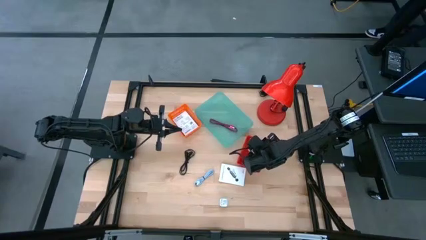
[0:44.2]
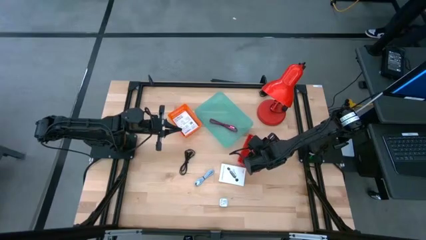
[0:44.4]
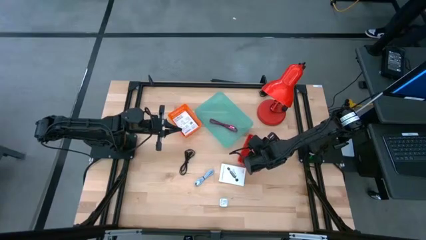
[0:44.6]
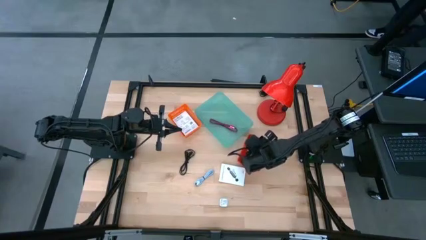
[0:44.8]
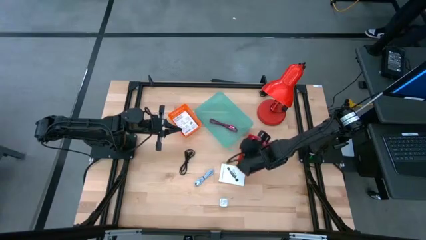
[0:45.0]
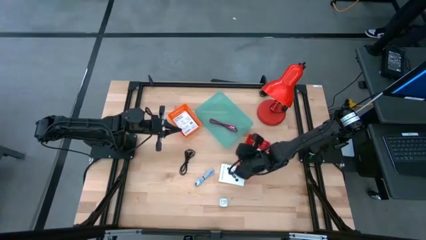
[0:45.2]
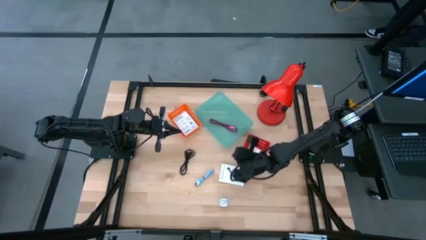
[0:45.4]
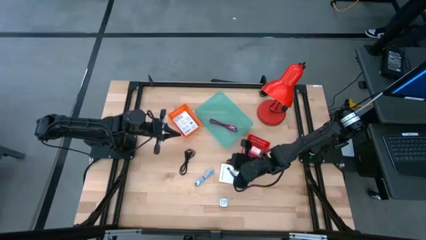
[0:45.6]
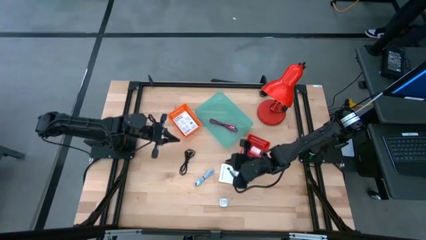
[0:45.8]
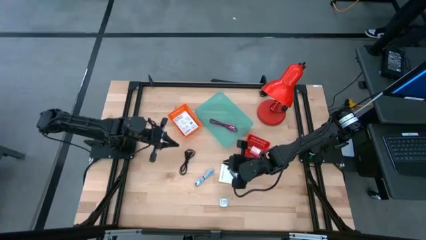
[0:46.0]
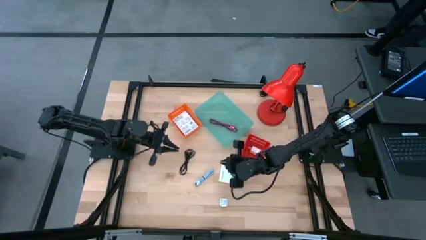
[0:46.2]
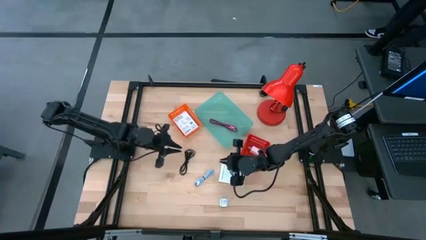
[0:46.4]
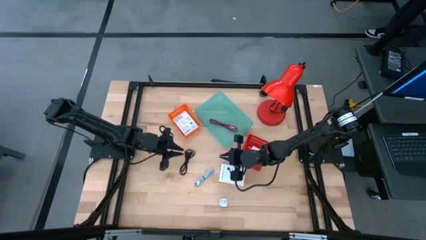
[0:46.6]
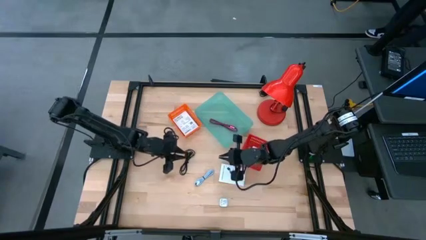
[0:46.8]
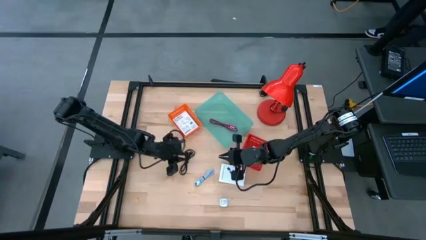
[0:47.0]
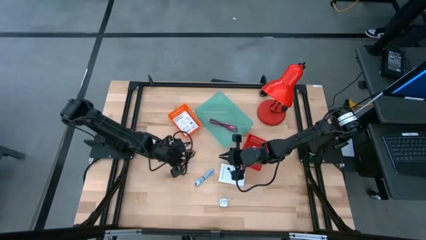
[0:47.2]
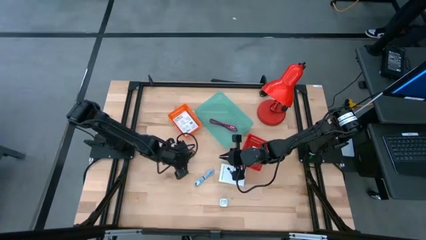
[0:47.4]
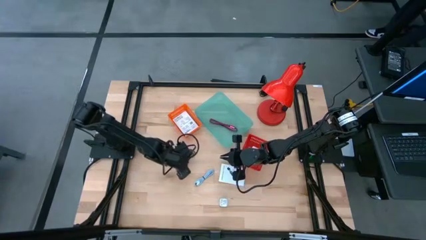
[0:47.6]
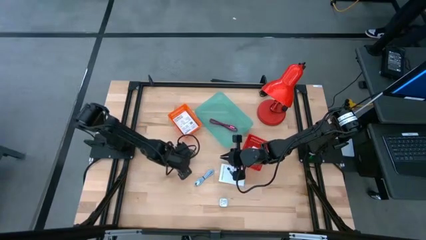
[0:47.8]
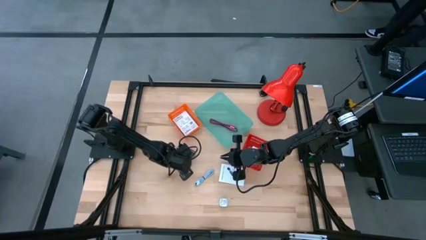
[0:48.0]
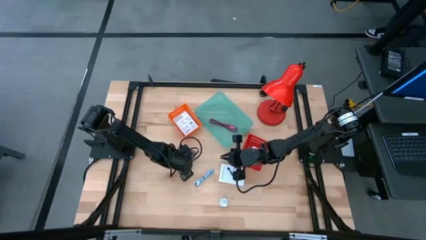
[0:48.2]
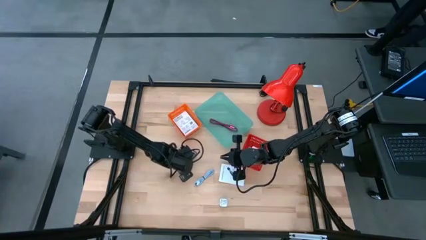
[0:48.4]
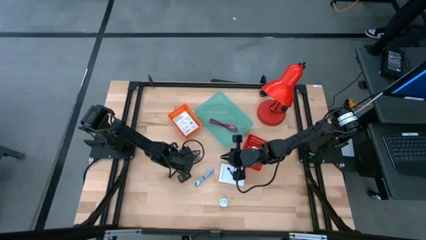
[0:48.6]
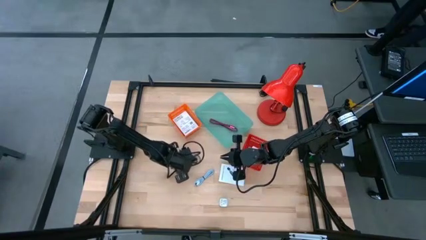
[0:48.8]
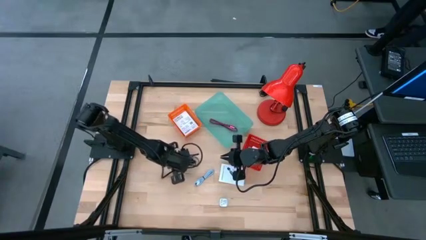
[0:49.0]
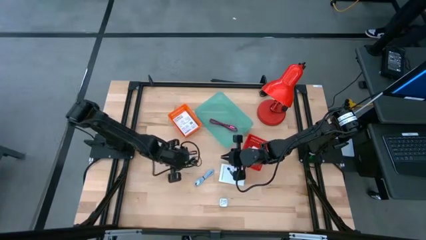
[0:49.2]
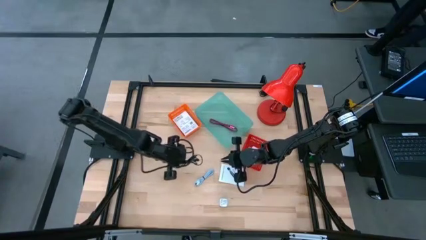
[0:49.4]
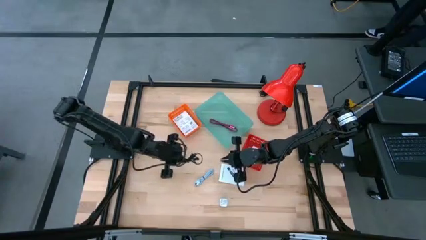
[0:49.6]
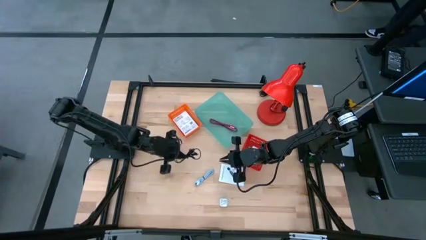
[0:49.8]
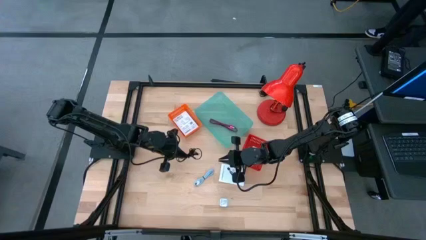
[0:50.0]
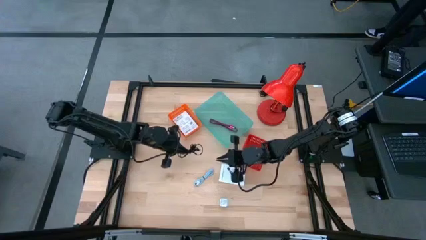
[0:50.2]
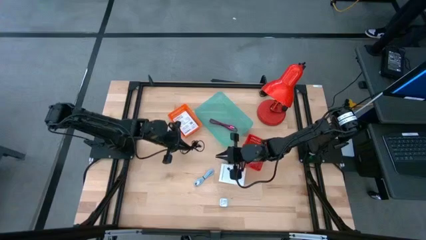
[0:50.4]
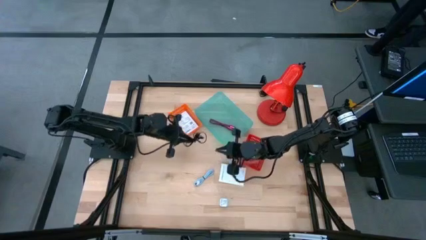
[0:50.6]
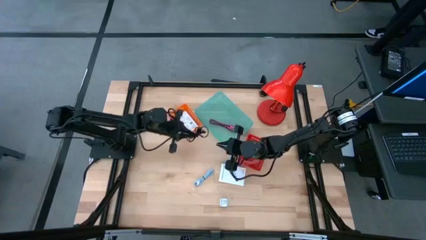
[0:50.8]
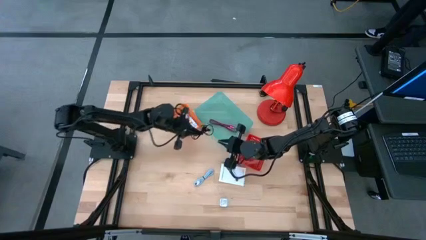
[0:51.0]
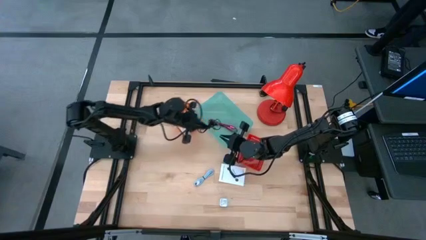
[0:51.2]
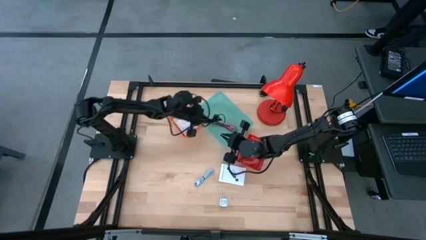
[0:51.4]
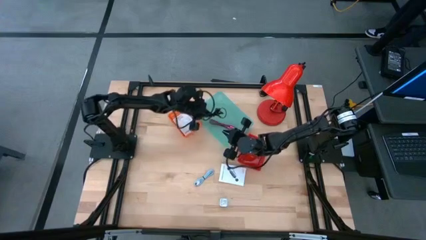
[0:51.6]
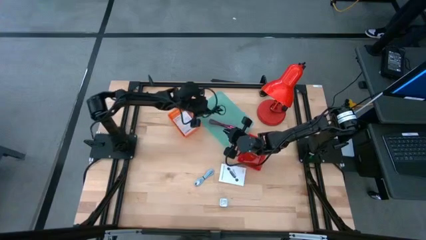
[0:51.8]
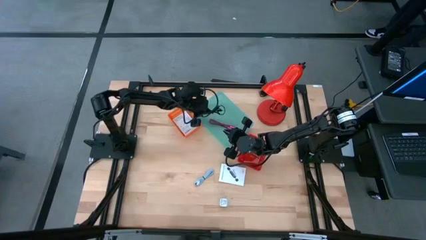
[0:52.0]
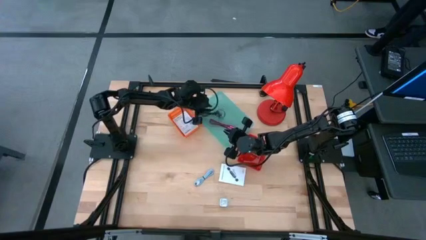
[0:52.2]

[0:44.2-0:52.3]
Task: Pick and place items into bin
Put the black charger cable into the blue bin

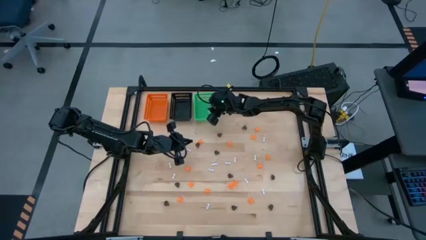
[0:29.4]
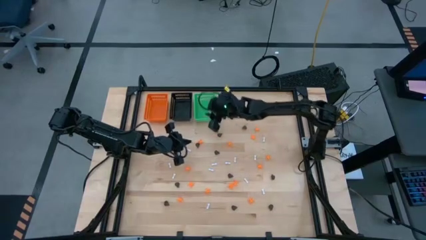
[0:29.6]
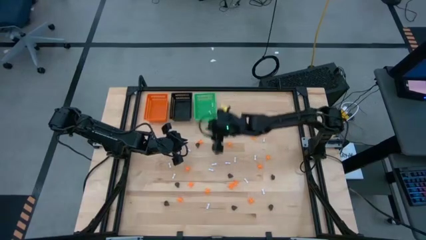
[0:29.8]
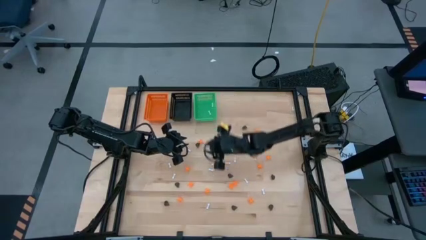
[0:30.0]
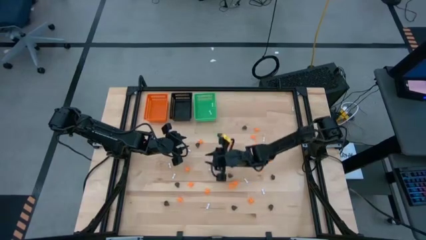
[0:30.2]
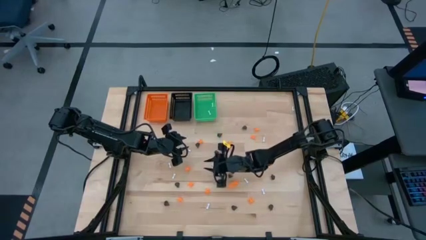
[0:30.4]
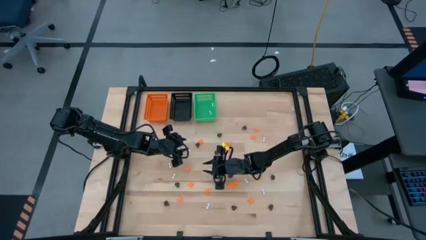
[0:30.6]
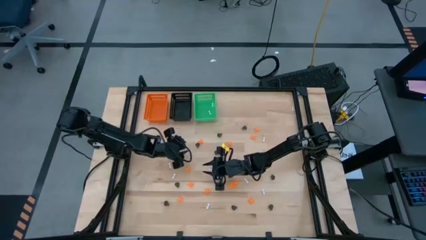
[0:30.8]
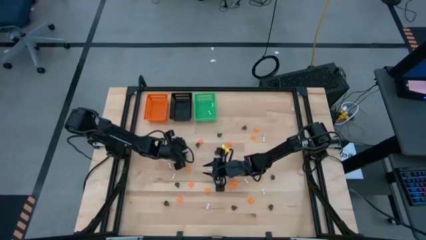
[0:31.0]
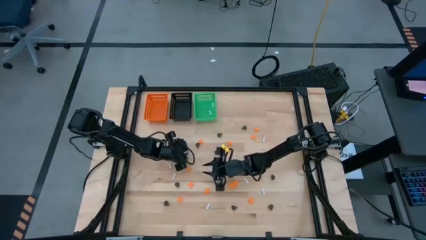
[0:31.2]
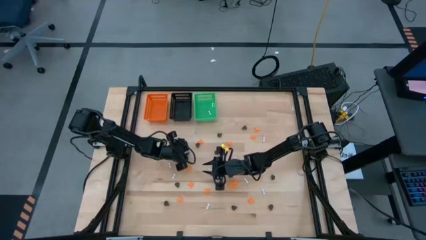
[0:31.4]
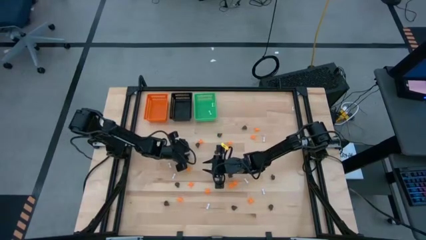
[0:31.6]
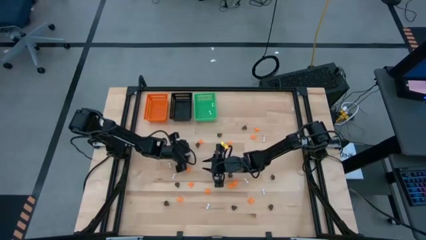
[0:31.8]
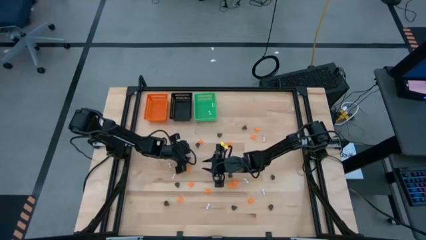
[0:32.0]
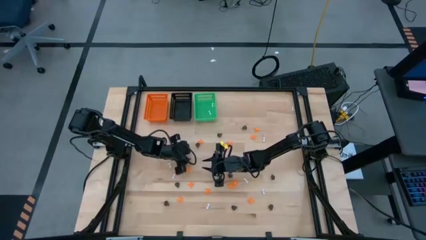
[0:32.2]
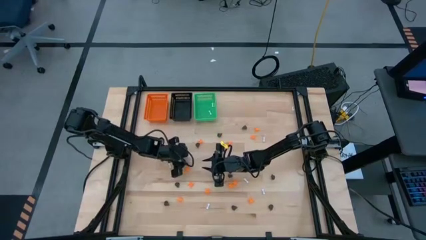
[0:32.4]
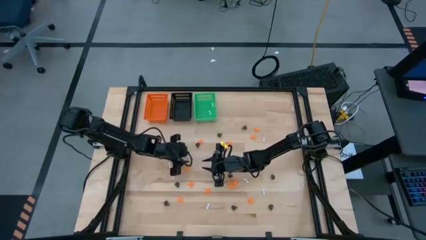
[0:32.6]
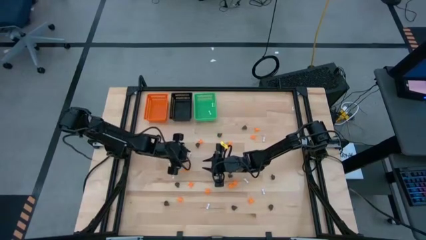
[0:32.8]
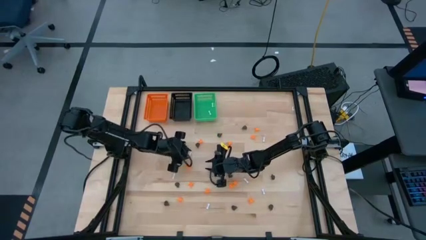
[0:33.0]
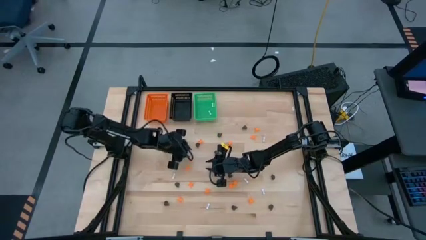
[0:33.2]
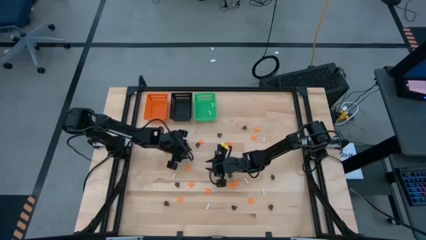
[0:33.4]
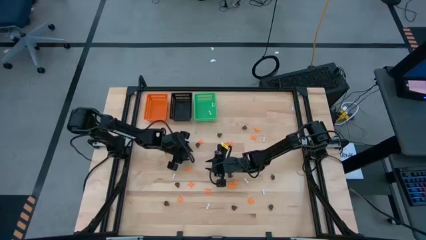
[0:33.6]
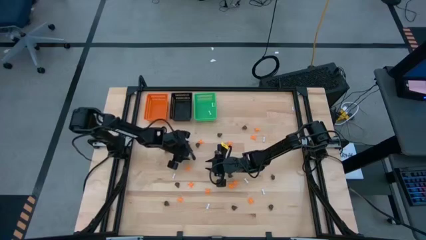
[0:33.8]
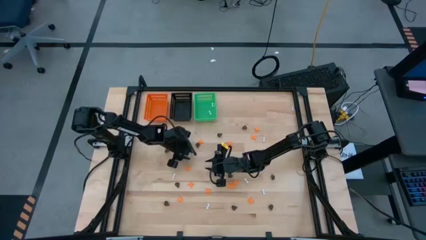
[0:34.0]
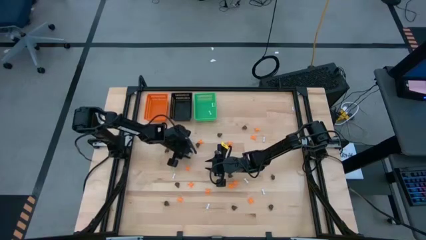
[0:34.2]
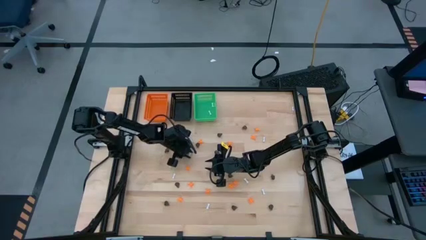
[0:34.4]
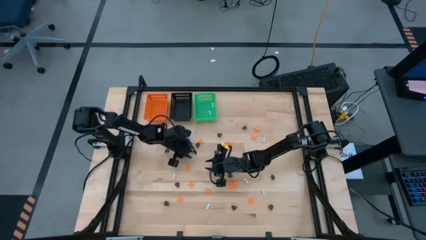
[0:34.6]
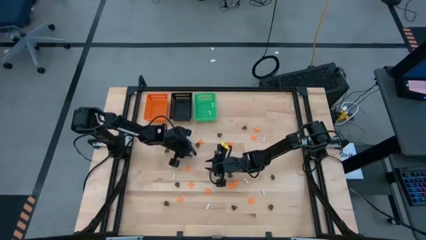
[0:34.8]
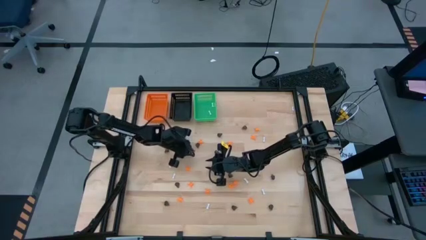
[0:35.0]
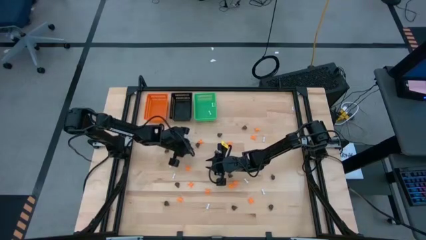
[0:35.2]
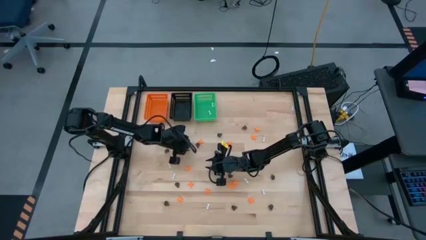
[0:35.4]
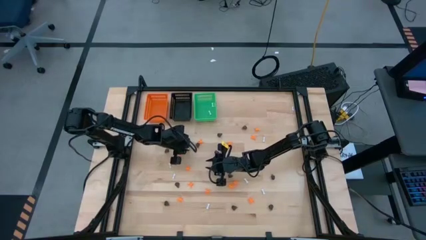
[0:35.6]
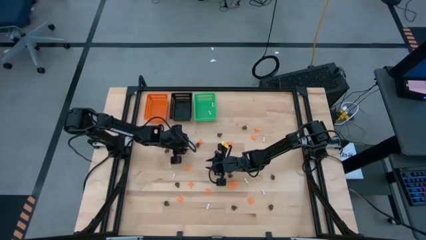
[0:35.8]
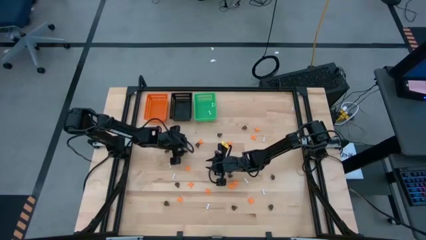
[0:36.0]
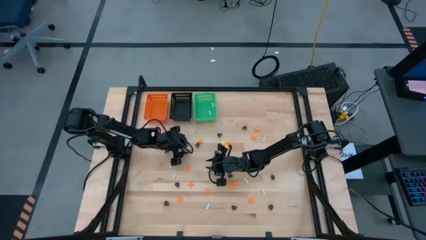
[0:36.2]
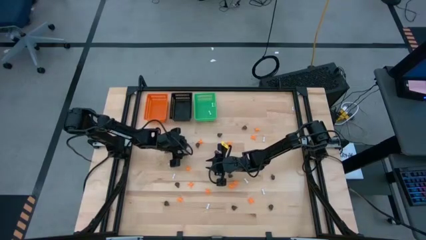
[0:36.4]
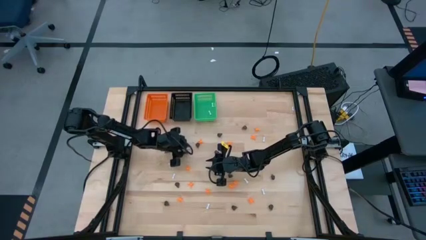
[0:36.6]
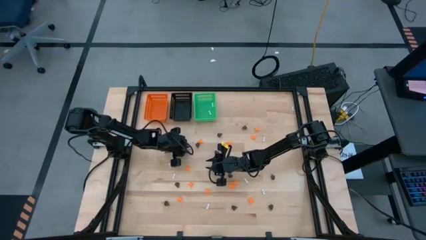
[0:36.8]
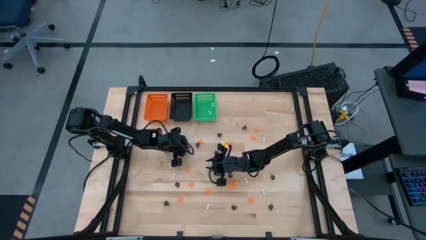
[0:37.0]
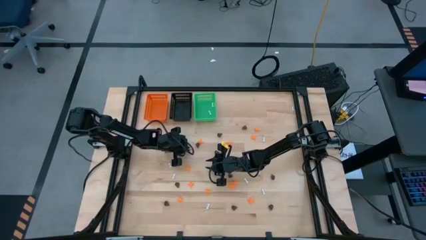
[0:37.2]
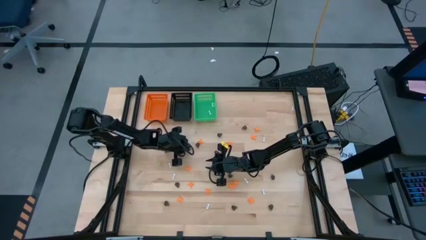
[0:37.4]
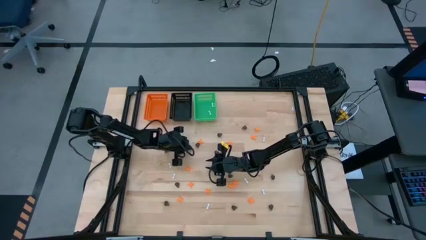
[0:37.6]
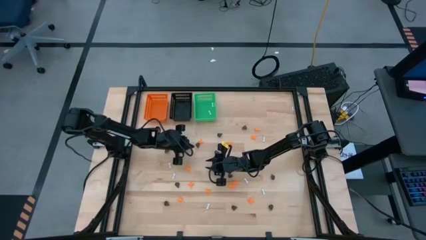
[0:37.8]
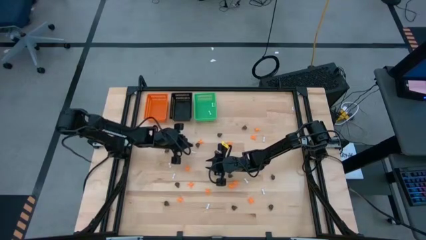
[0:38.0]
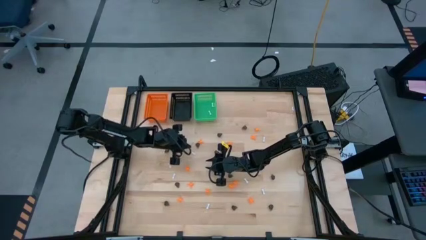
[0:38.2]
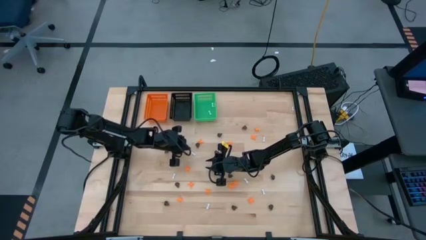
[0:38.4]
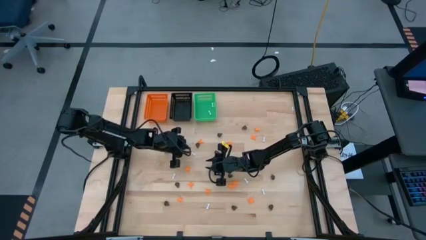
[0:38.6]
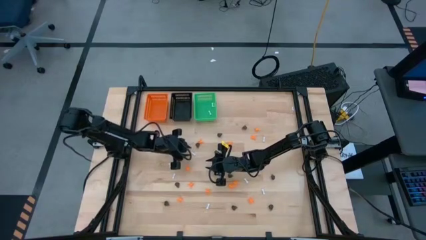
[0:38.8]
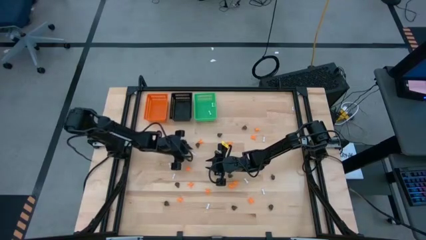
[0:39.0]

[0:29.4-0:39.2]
Task: Sort Halloween decoration
Put the white bone toy into the green bin
